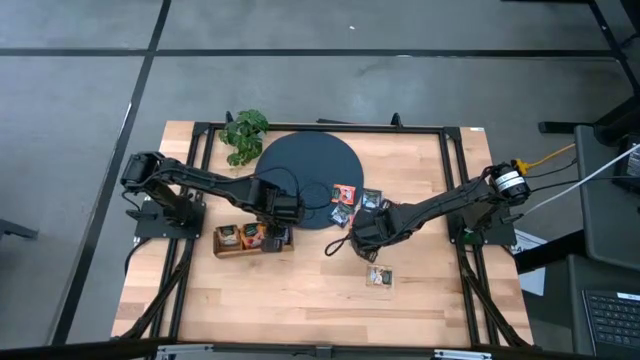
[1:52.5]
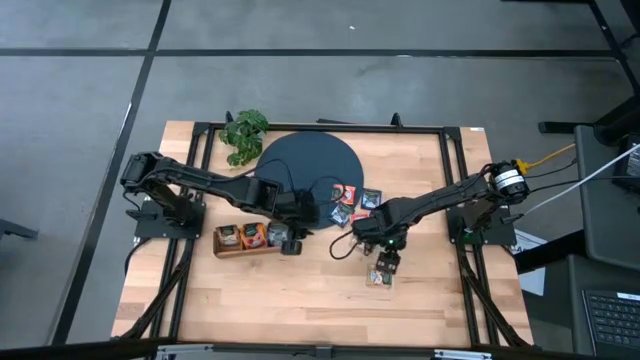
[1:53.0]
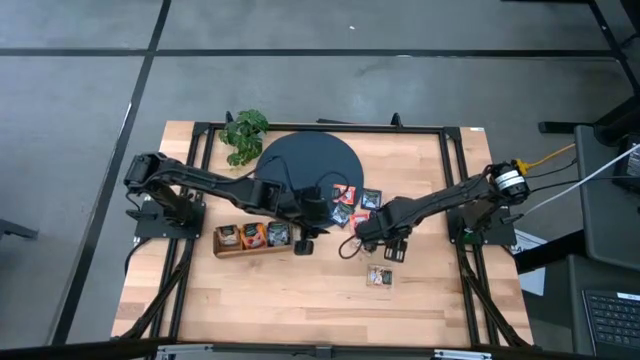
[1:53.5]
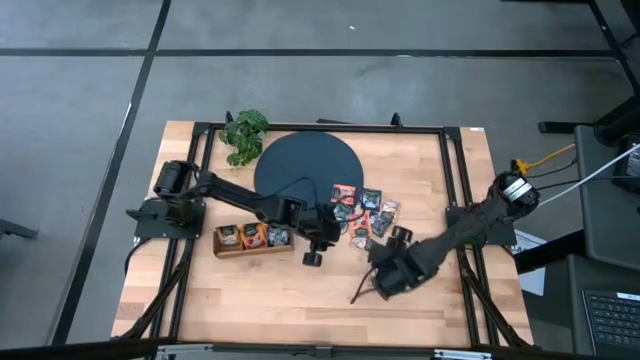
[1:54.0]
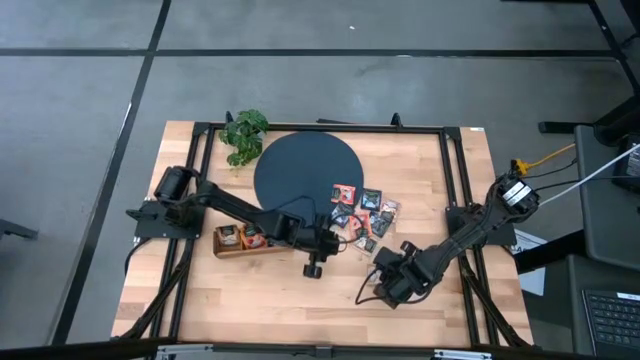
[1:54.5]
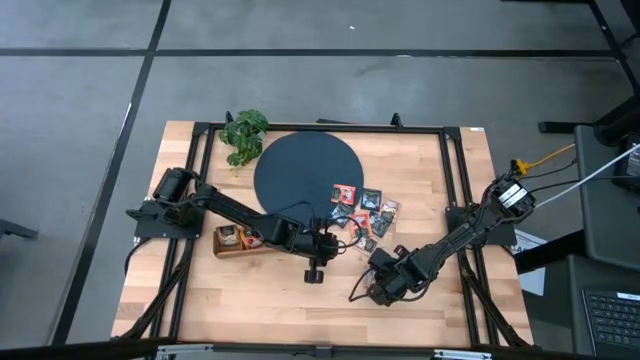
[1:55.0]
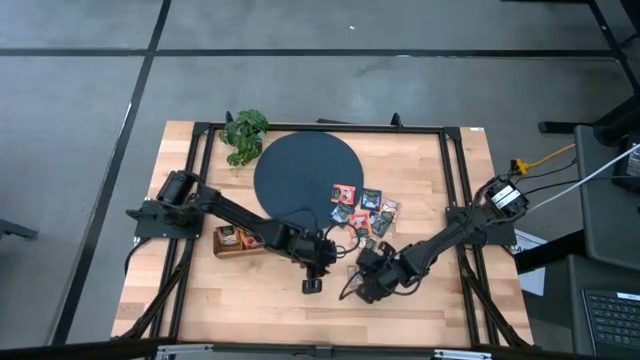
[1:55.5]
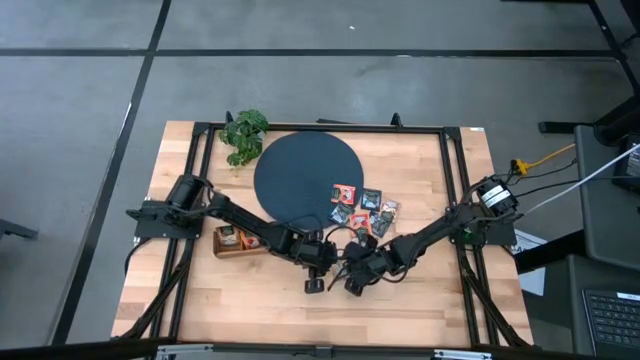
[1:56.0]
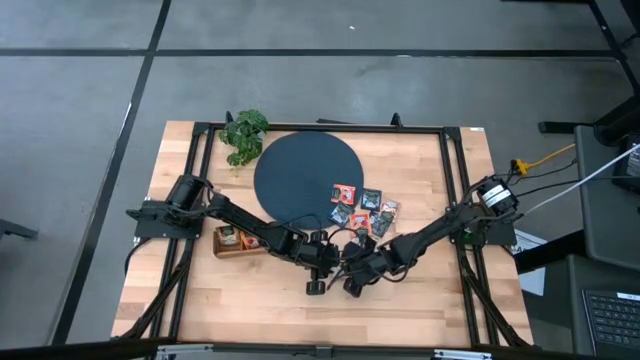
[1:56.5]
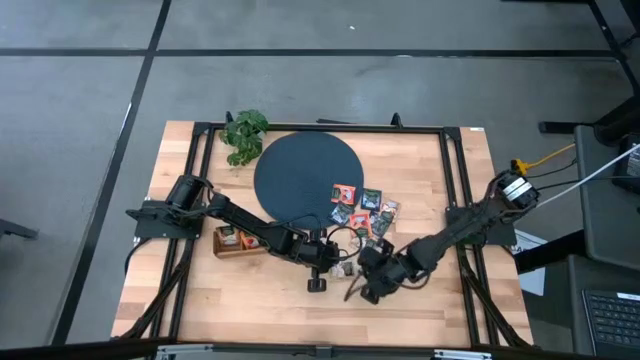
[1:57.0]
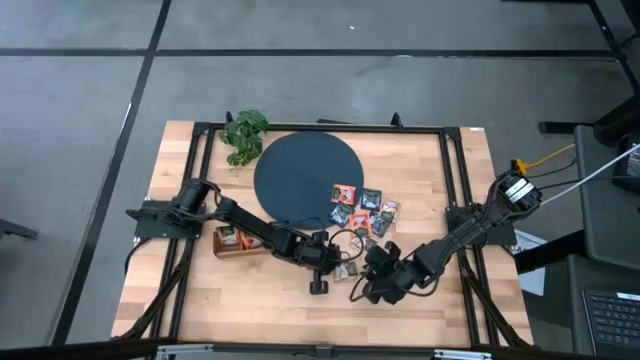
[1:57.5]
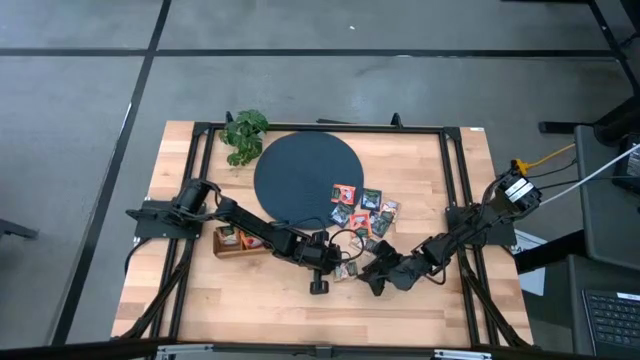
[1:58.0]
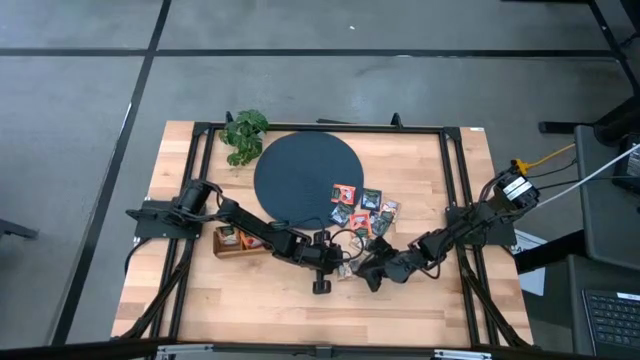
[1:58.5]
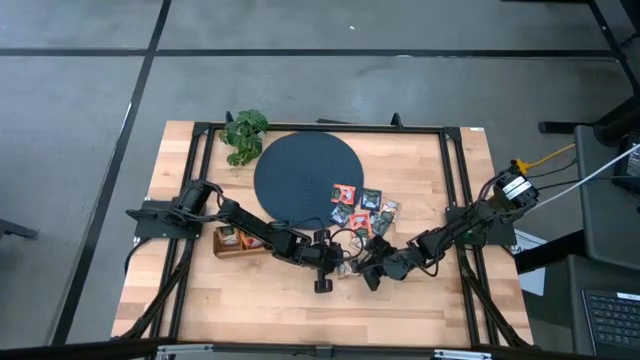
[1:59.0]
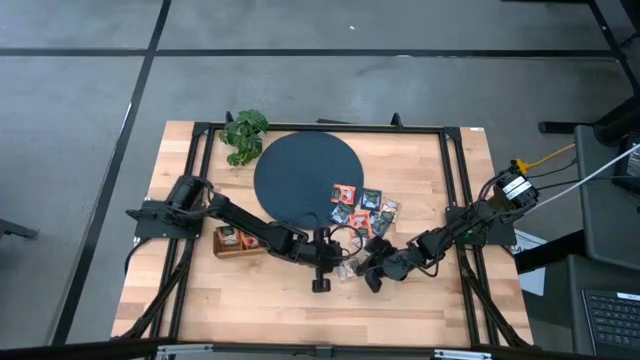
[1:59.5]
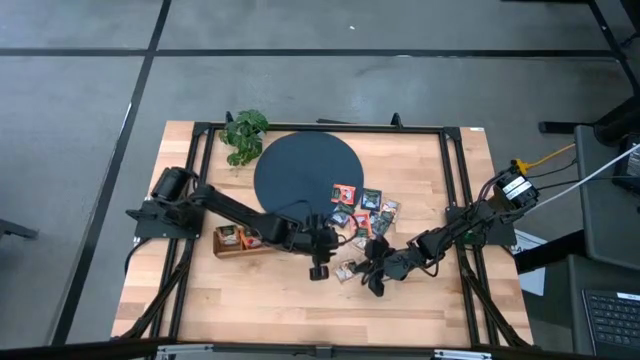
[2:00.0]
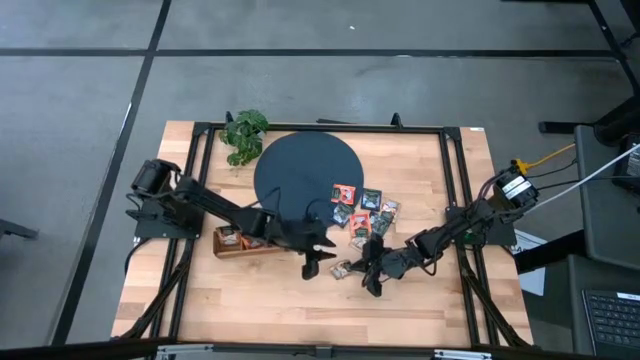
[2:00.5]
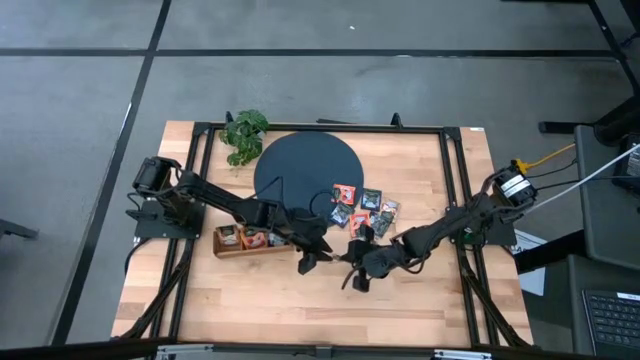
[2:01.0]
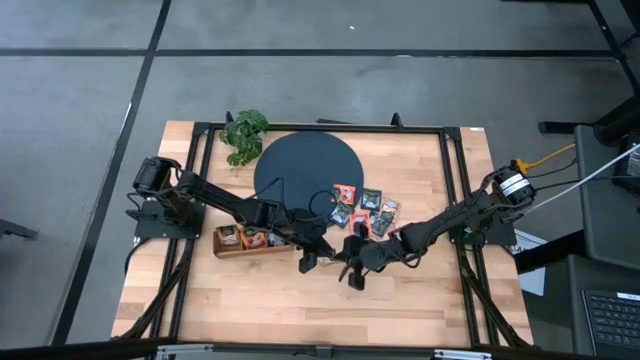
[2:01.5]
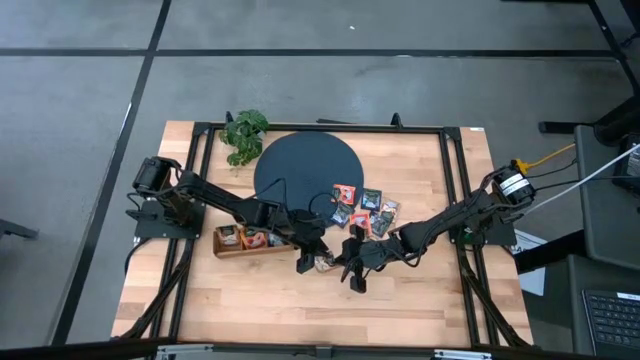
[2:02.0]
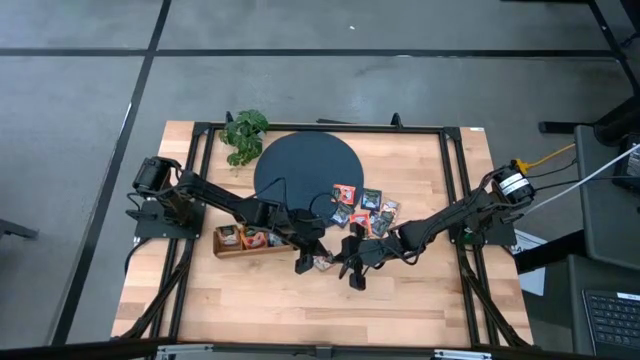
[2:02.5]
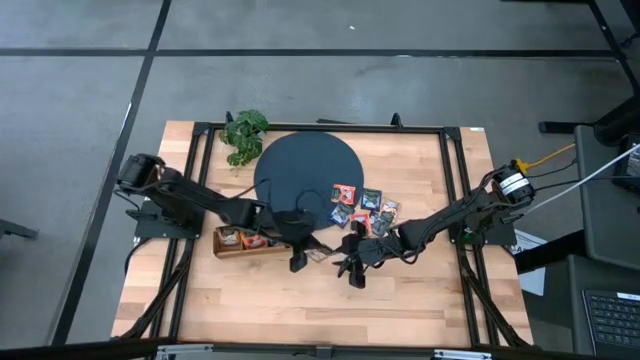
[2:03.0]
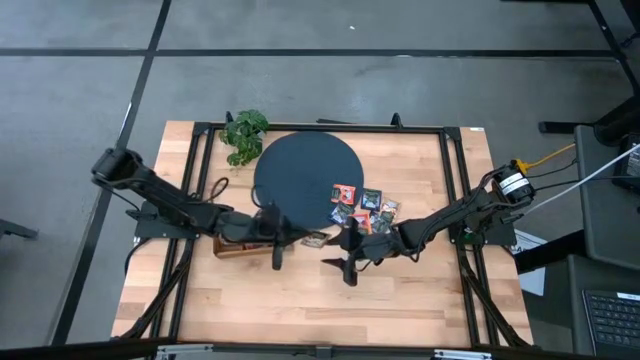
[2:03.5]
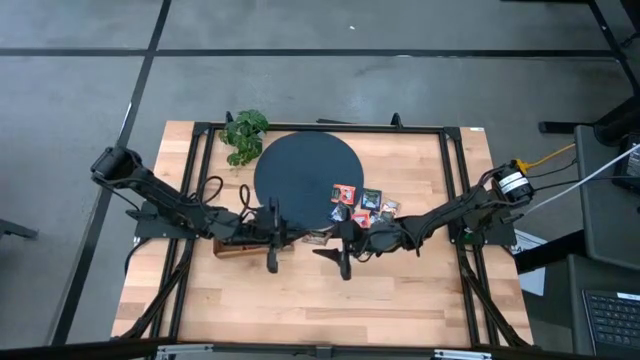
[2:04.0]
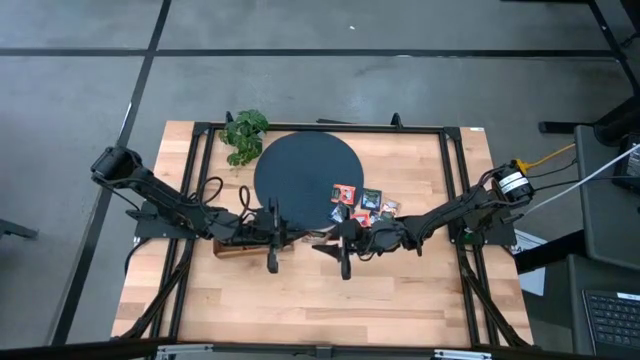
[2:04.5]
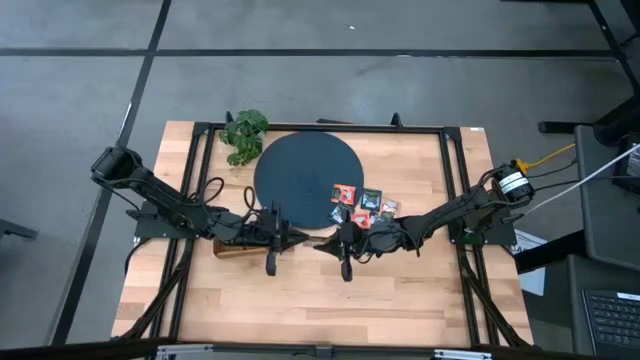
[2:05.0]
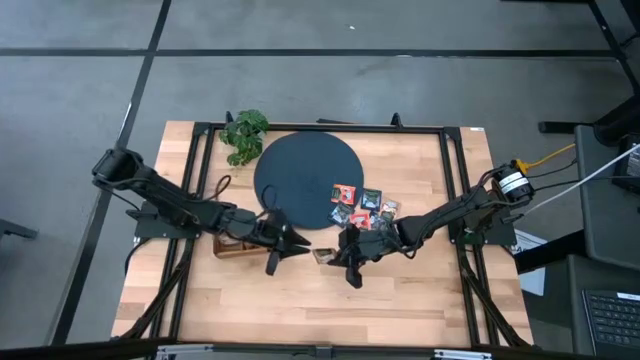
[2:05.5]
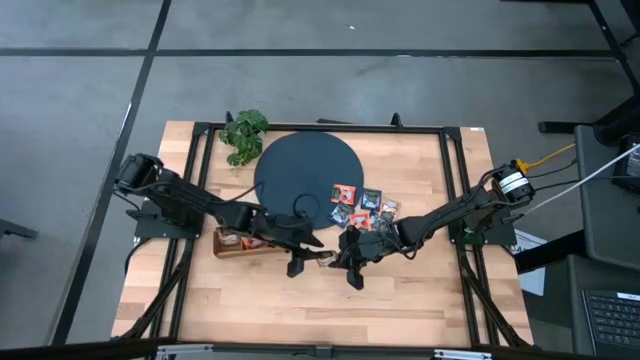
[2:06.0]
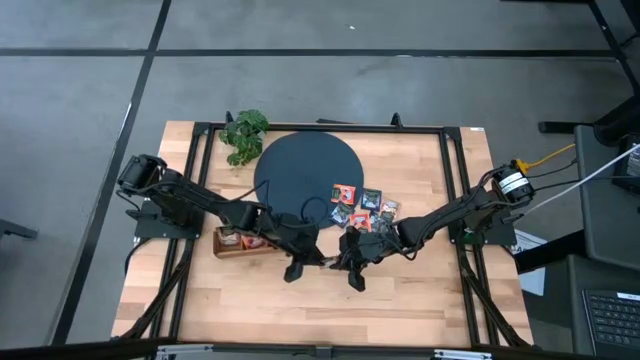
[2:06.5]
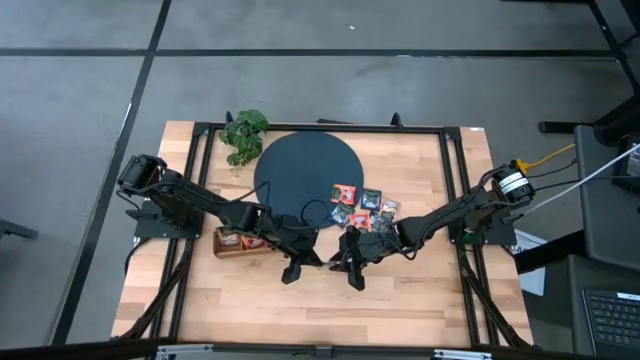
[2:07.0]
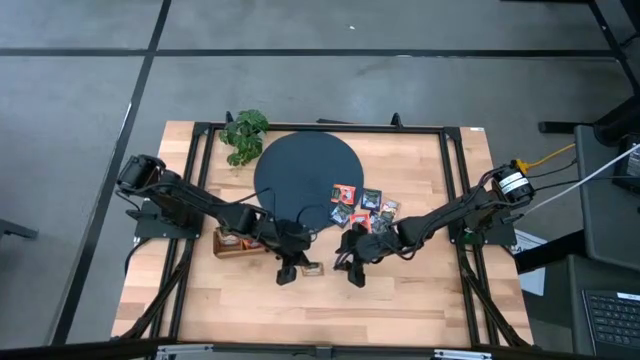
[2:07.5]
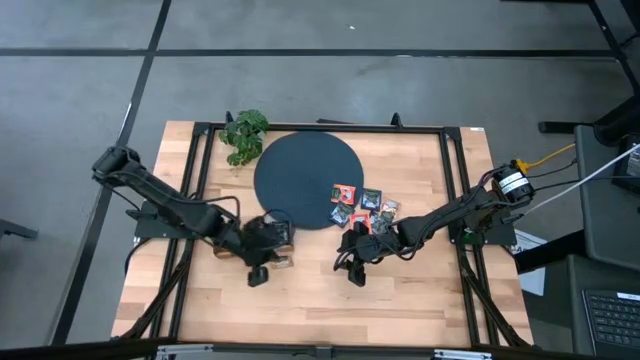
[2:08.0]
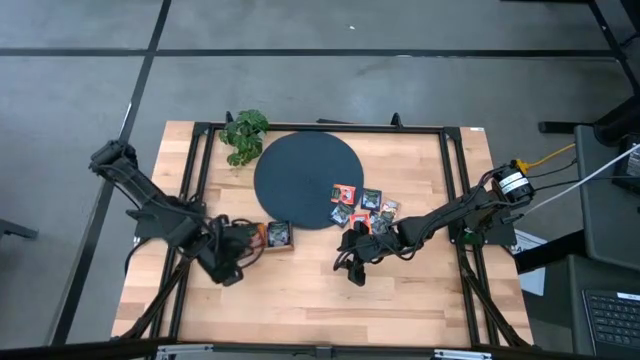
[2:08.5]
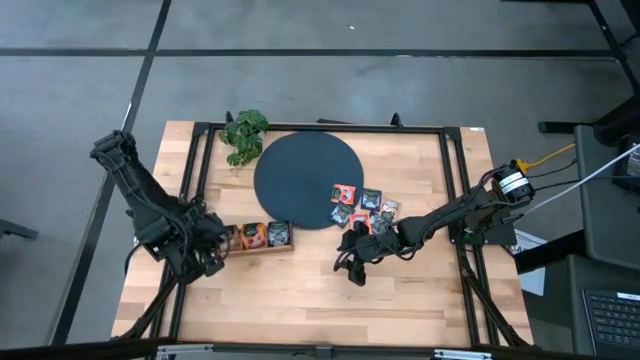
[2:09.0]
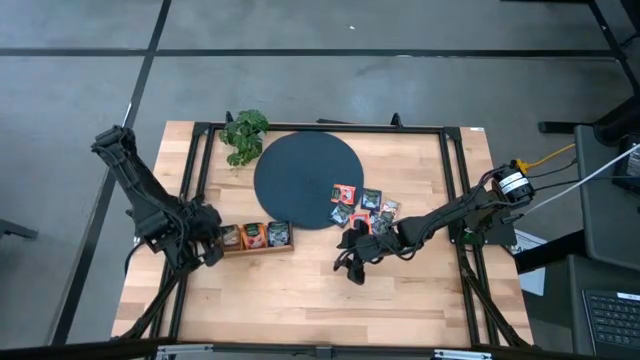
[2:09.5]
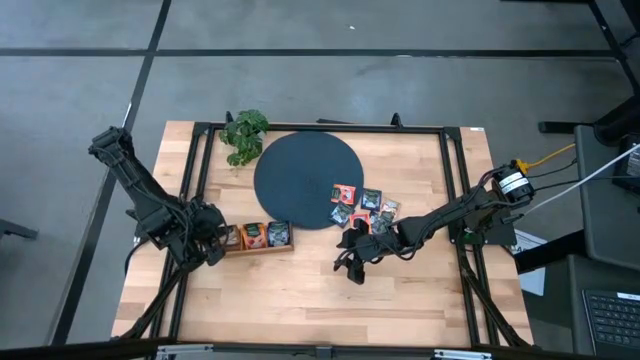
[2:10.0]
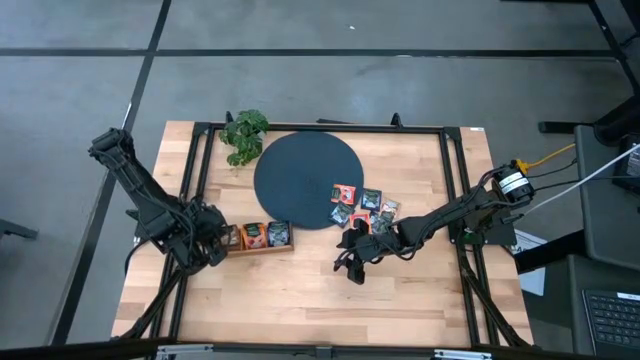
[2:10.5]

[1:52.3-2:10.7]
Task: Pick & Place Tea
Put the brown tea bag into the left section of the wooden organizer

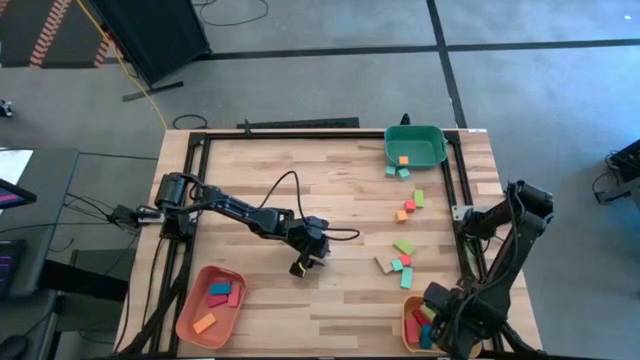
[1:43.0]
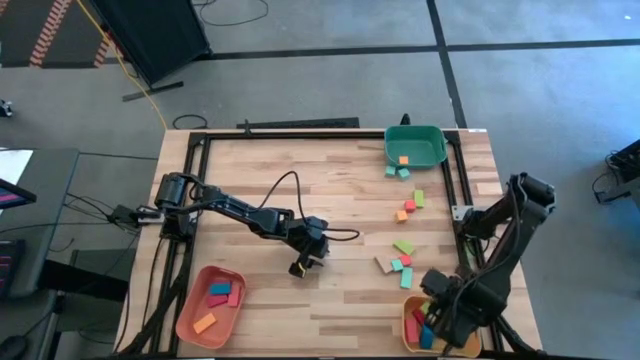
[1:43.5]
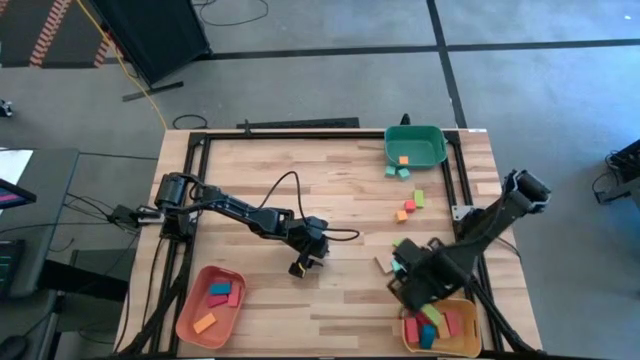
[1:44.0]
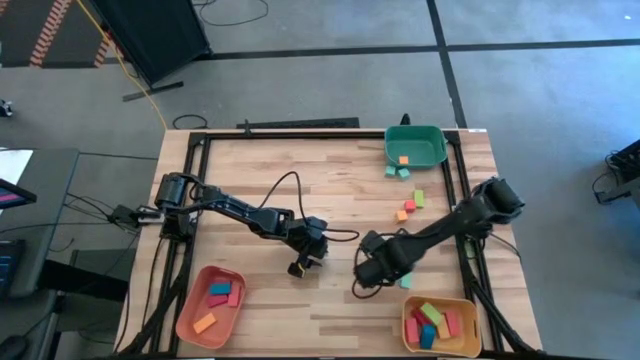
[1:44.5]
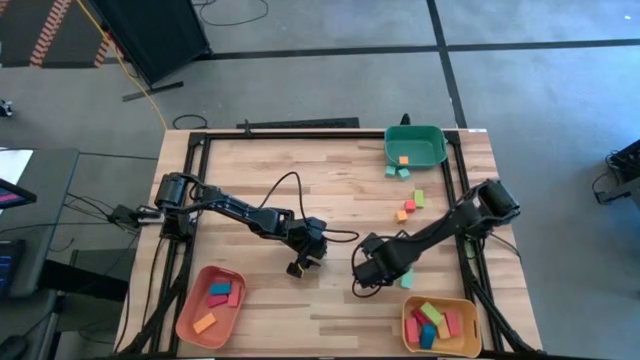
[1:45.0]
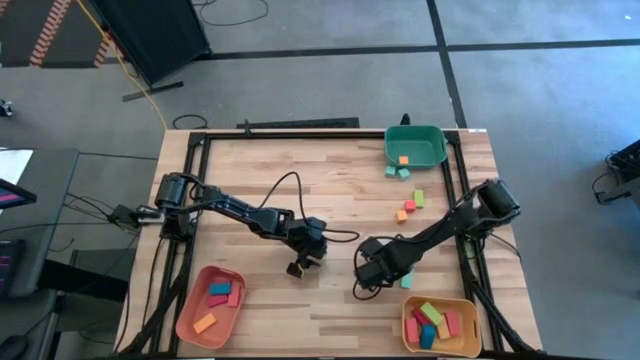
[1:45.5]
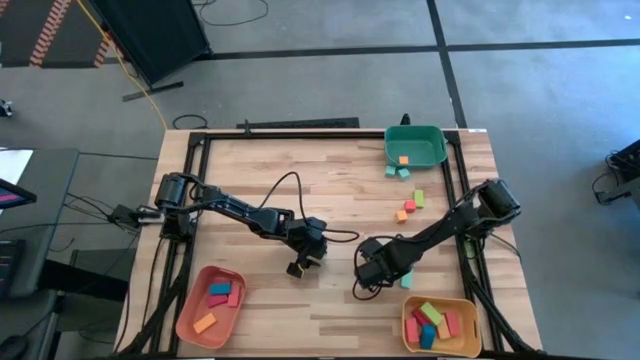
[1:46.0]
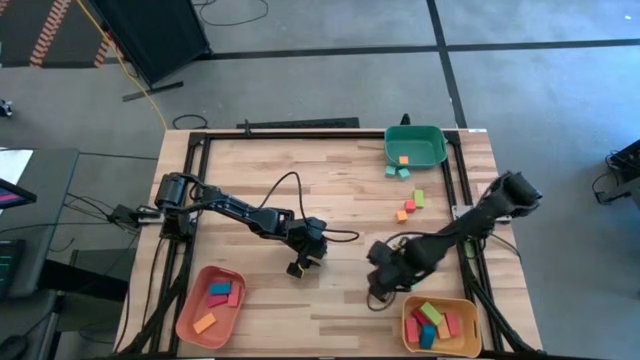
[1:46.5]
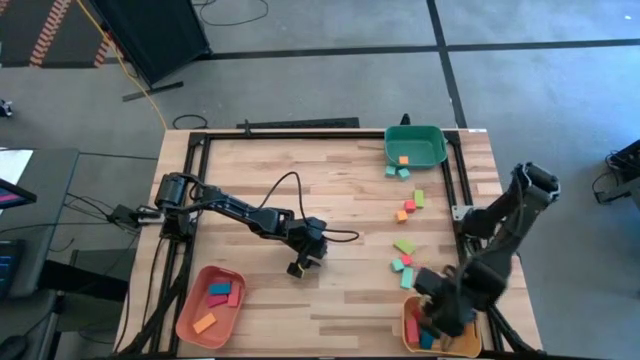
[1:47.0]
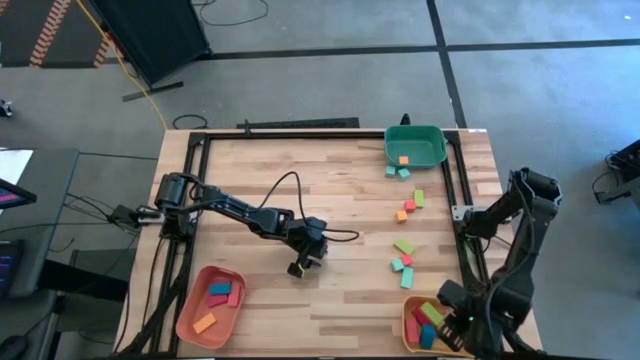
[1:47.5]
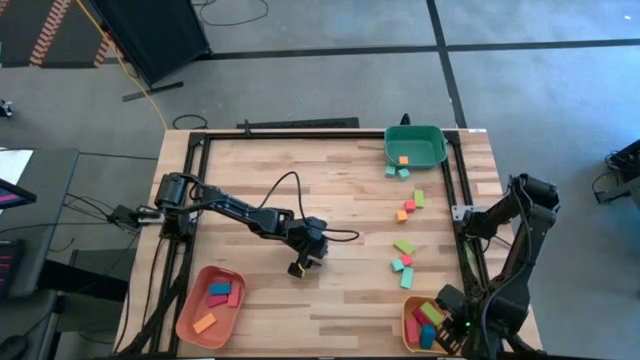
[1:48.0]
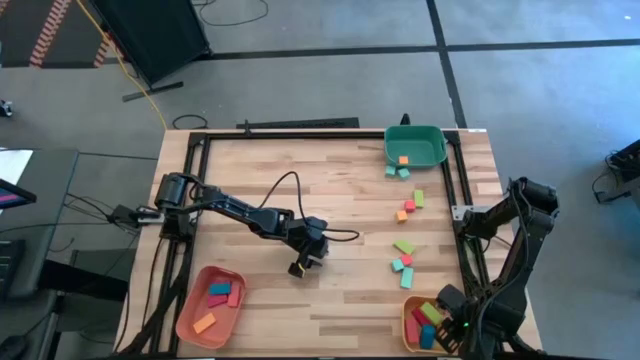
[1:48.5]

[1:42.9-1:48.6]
Task: Sort blocks by size
Put the large brown rectangular block into the yellow bin
